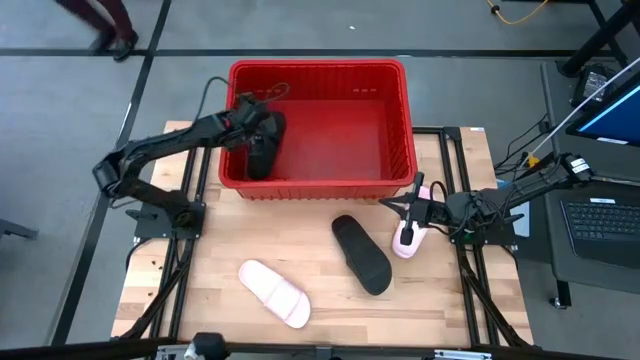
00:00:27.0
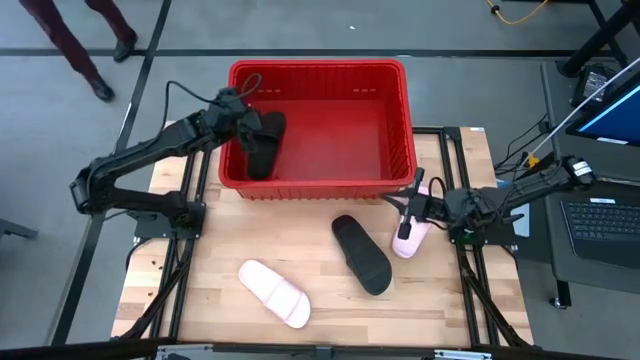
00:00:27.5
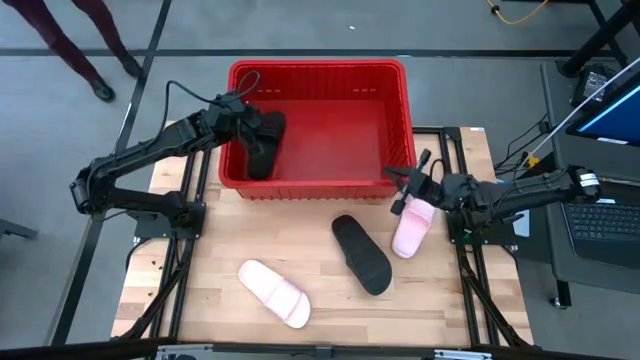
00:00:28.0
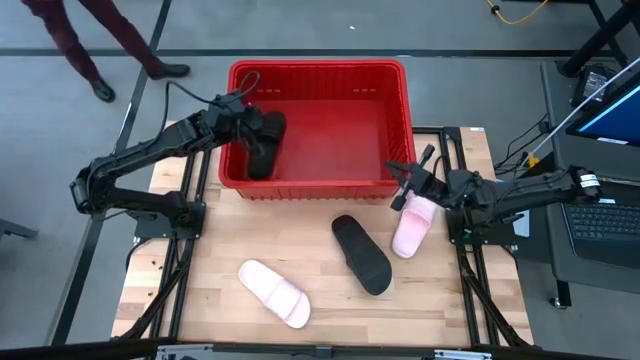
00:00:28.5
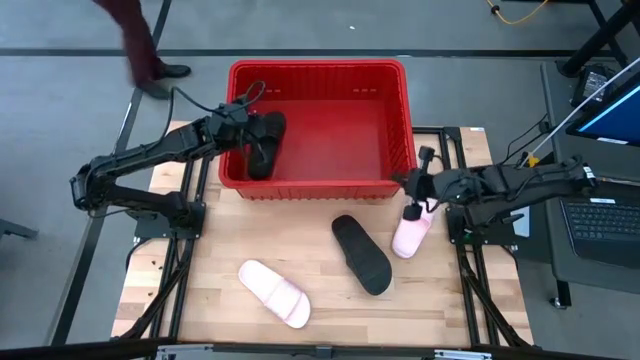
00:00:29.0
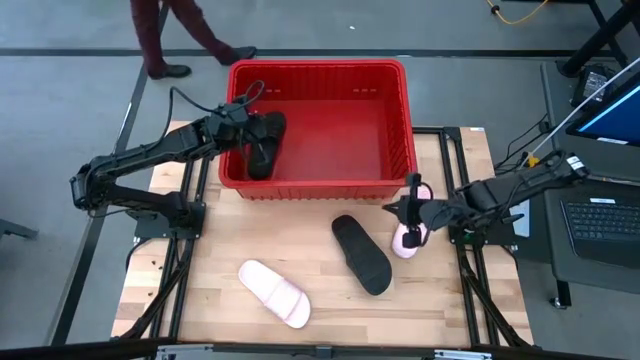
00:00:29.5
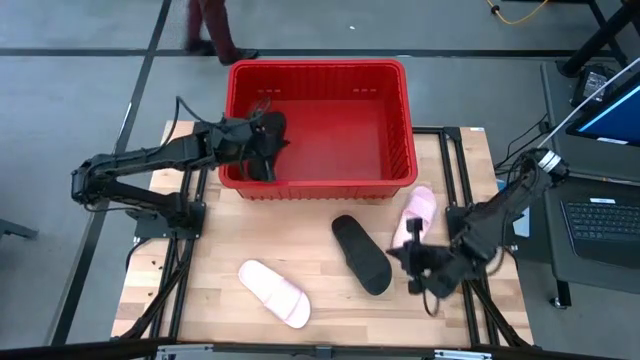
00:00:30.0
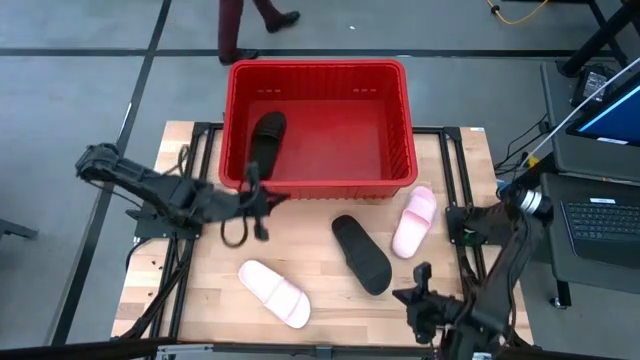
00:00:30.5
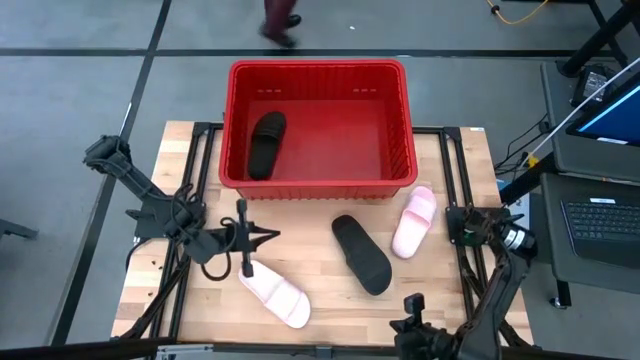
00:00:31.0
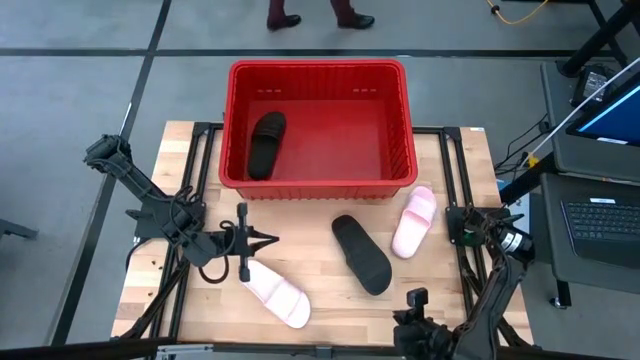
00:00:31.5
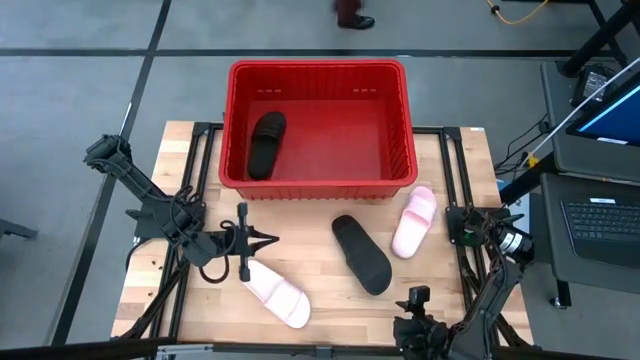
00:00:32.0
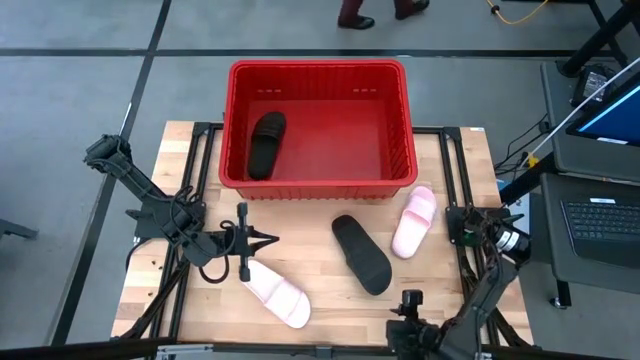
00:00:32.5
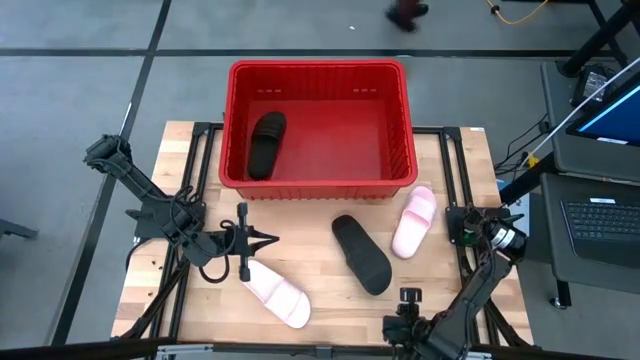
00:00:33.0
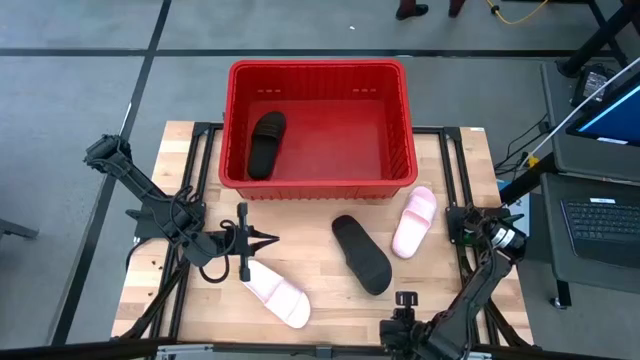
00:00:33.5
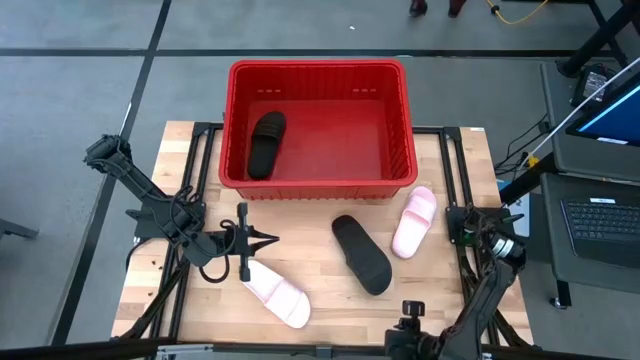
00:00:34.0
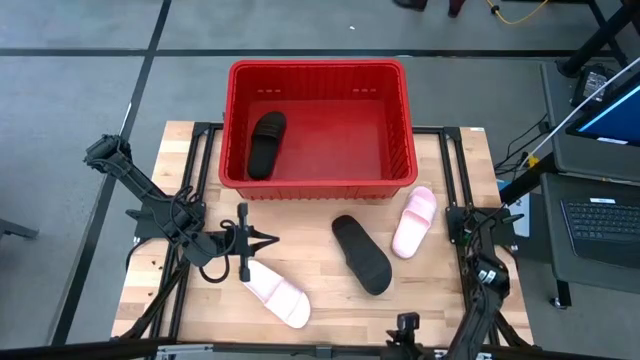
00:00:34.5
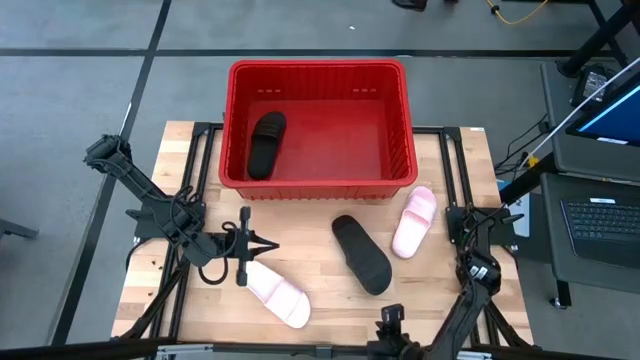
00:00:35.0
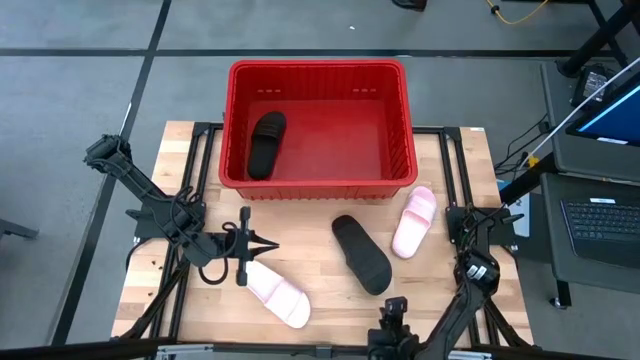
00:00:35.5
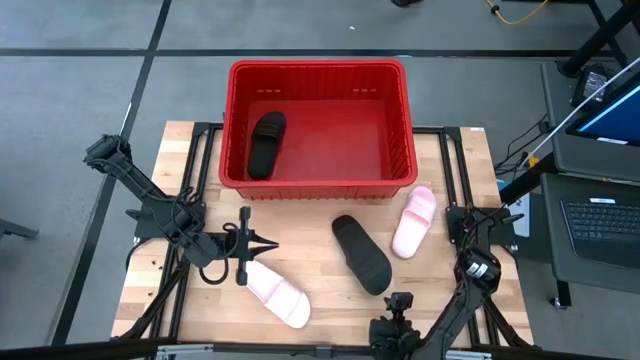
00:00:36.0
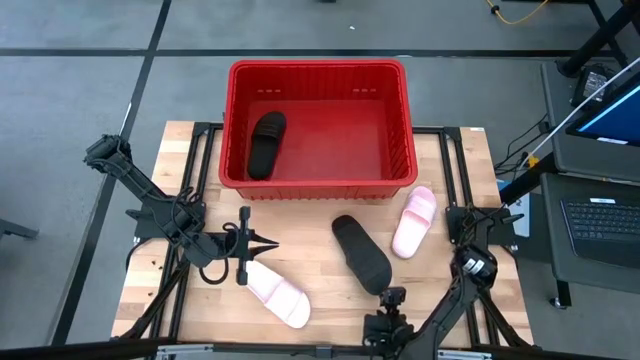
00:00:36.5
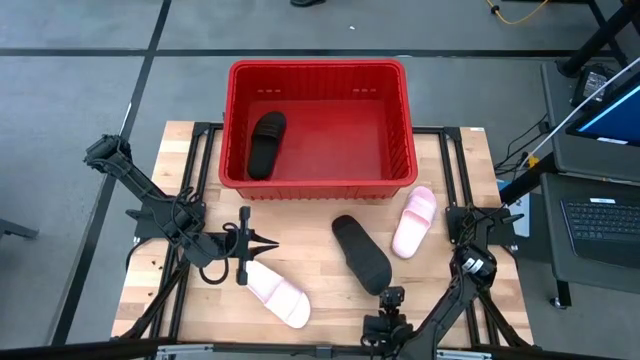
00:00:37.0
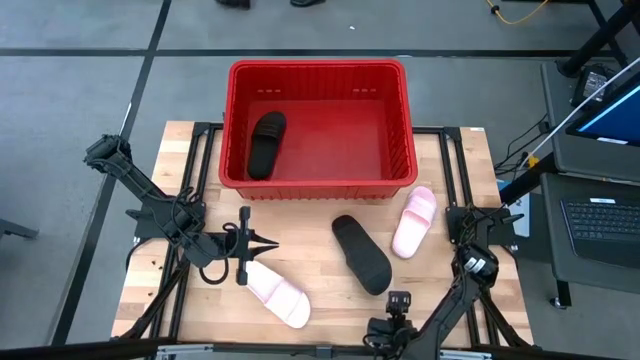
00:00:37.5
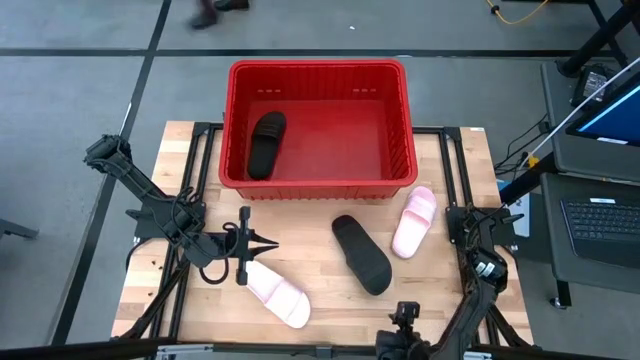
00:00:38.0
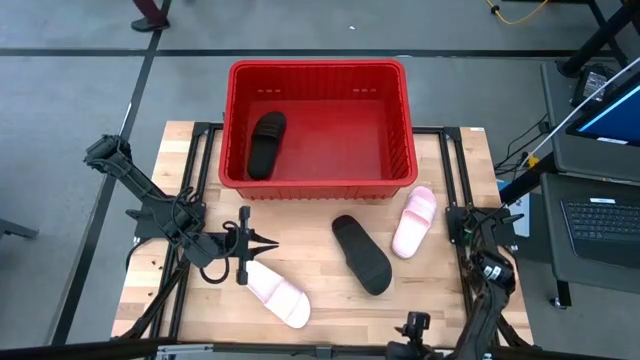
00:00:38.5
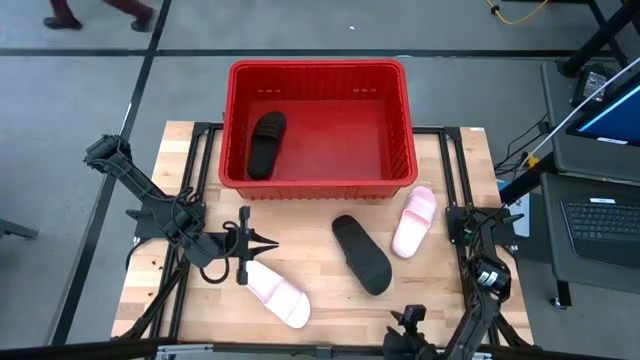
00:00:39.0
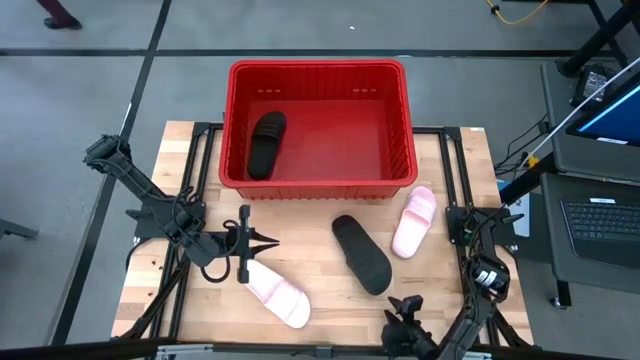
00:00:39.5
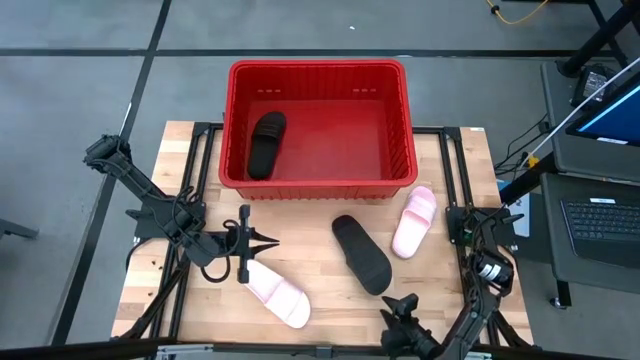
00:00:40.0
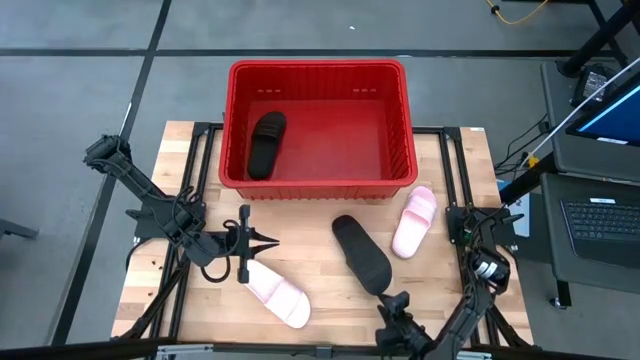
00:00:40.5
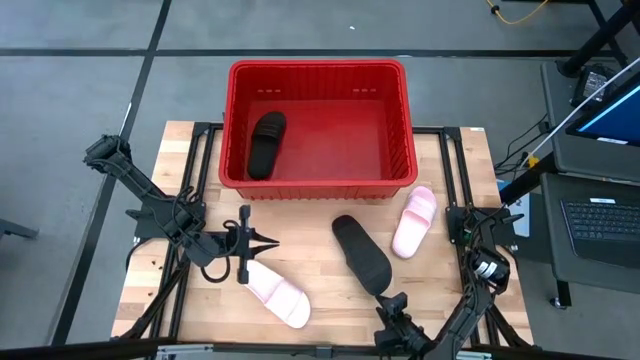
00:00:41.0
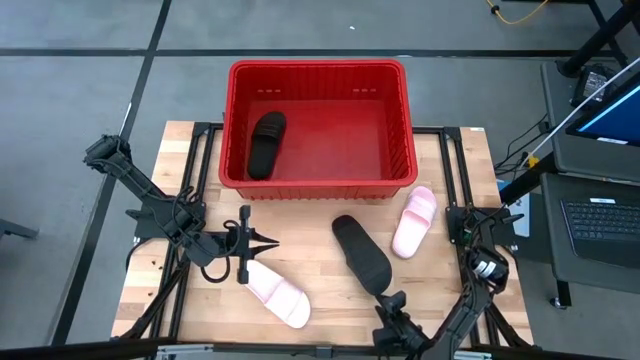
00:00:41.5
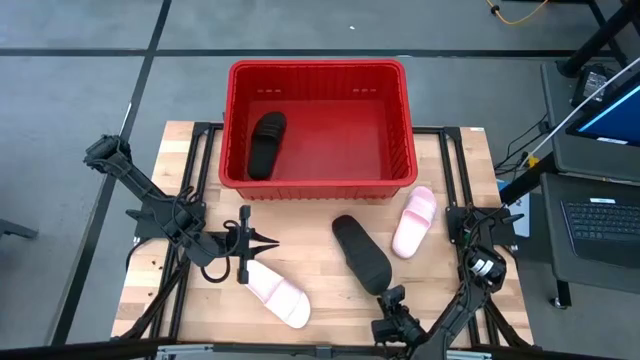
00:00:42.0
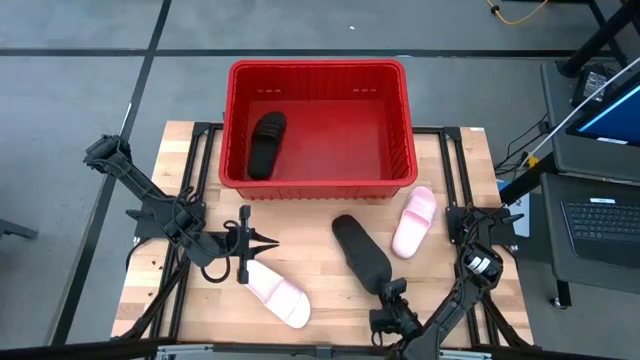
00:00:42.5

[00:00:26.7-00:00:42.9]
Task: Pick and place slides into bin
Put the black slide into the red container

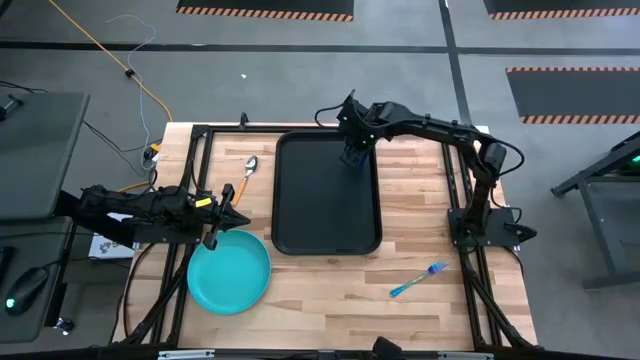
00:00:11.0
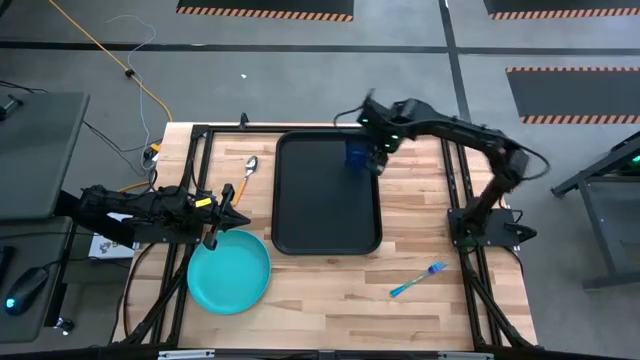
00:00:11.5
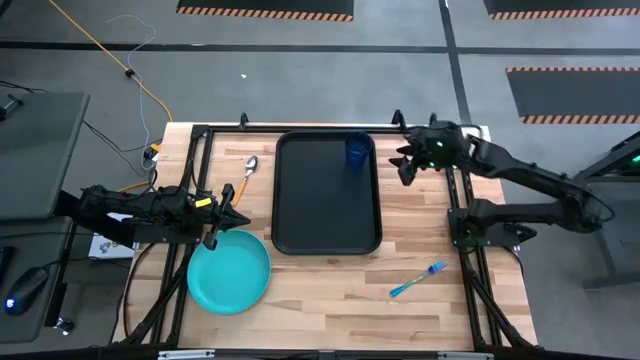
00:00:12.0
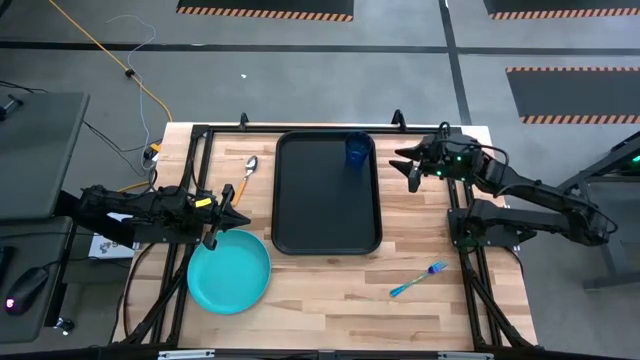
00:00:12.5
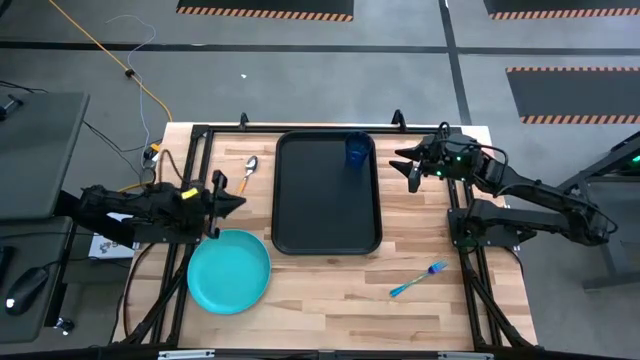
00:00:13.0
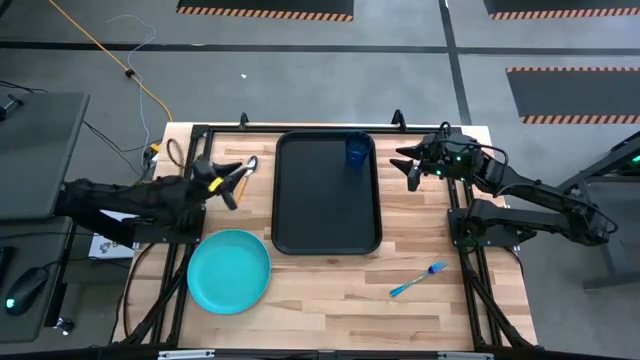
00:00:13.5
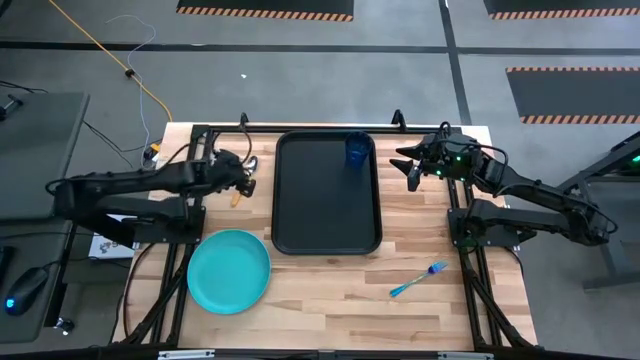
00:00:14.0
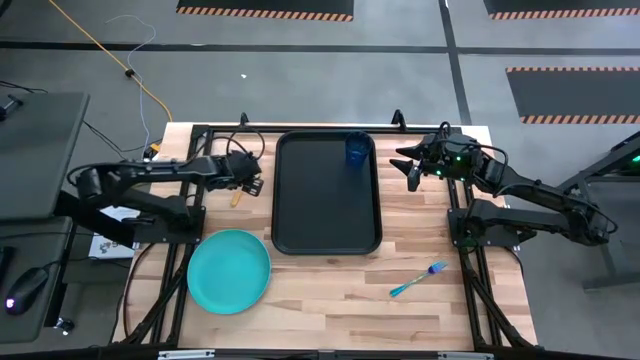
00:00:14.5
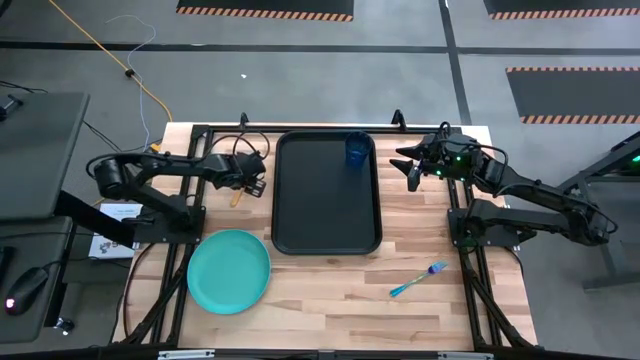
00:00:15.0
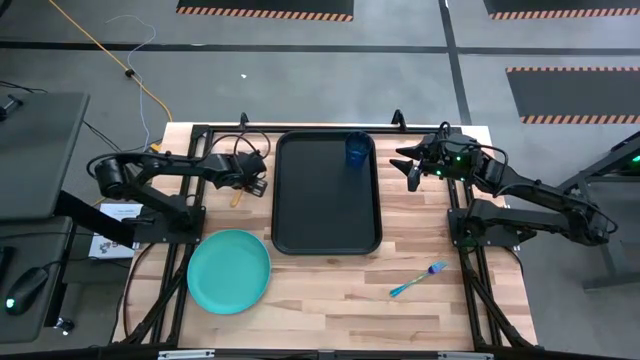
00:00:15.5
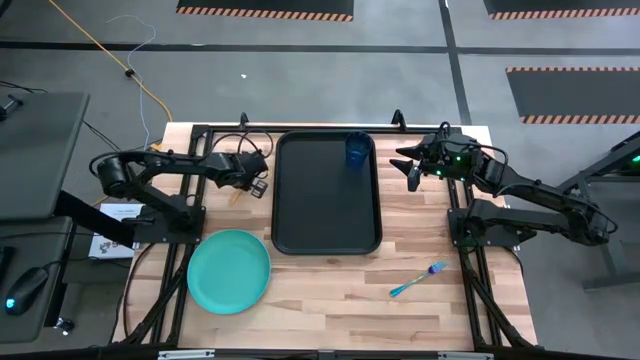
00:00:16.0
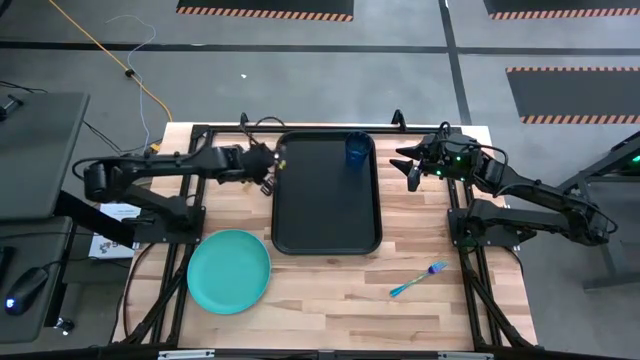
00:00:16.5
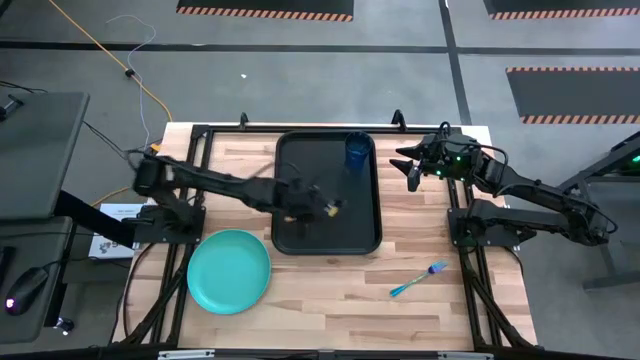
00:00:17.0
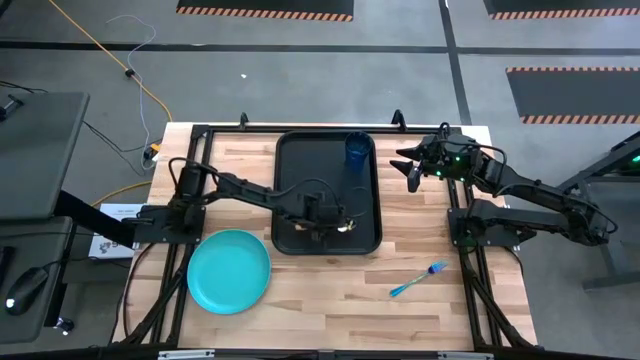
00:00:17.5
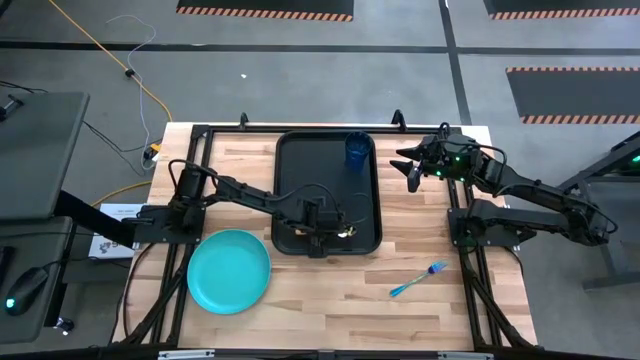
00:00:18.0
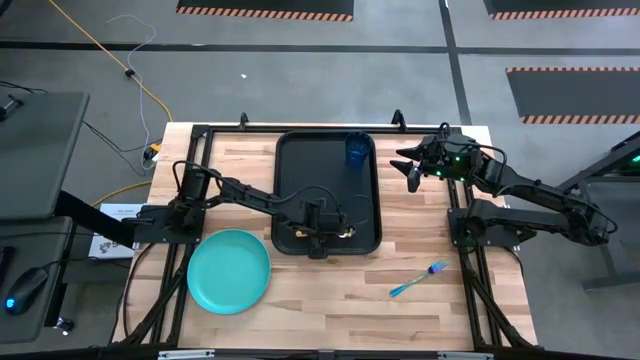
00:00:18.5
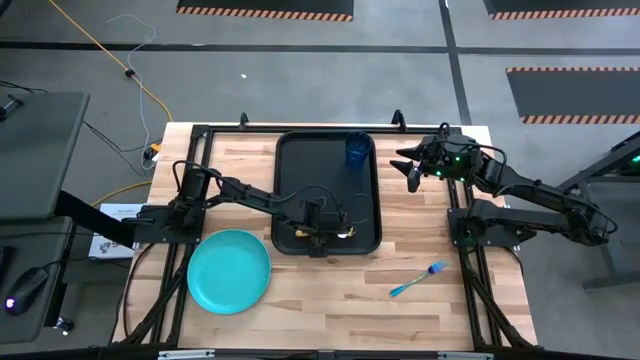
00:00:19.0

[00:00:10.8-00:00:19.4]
Task: Pick and place plate/cup/fork/spoon on tray
Put the yellow spoon on the bottom of the black tray
